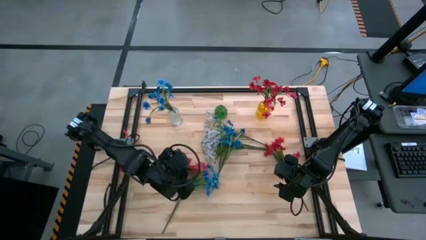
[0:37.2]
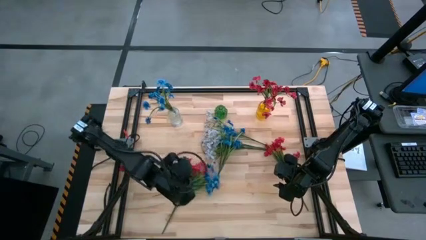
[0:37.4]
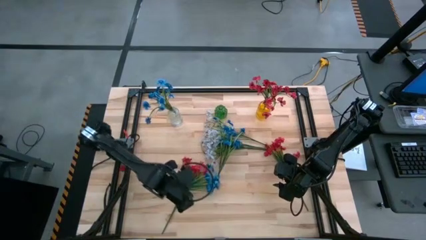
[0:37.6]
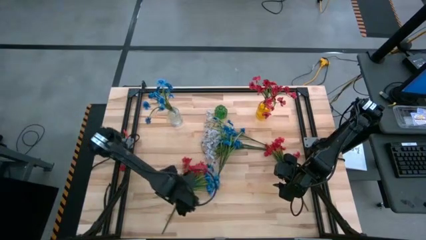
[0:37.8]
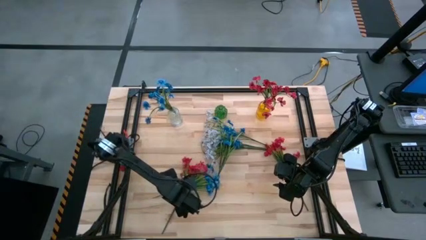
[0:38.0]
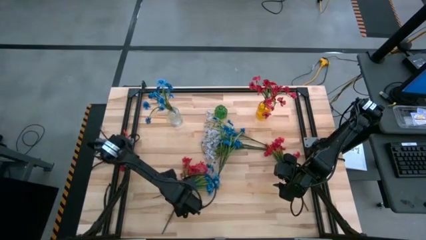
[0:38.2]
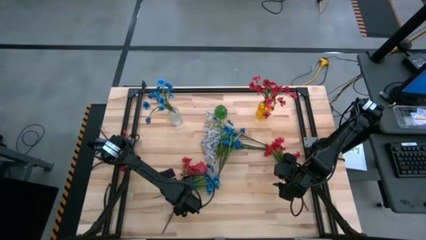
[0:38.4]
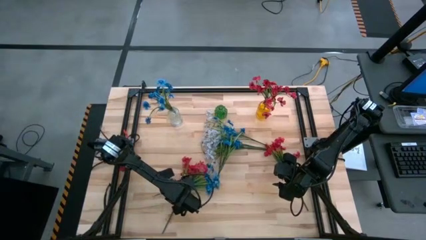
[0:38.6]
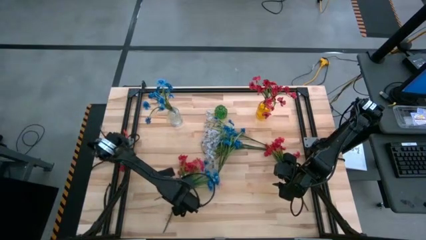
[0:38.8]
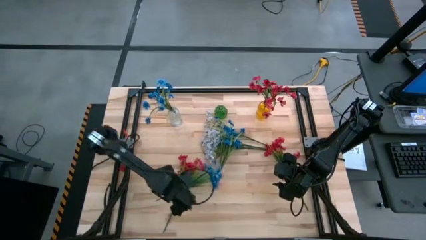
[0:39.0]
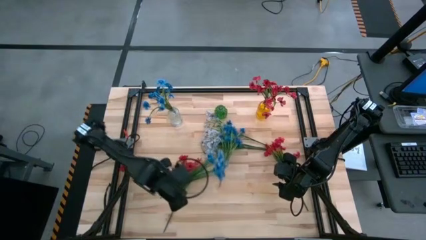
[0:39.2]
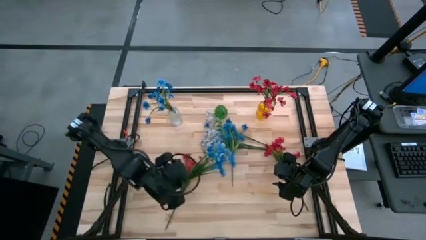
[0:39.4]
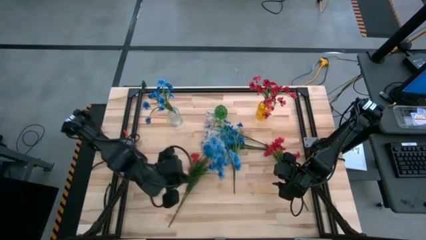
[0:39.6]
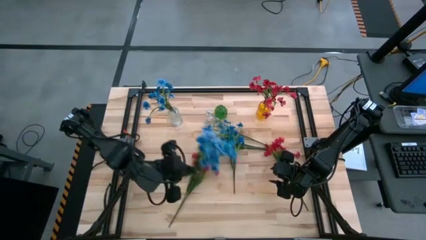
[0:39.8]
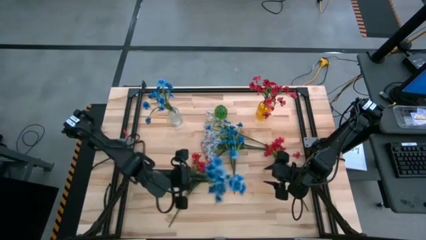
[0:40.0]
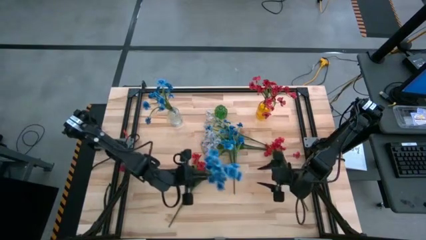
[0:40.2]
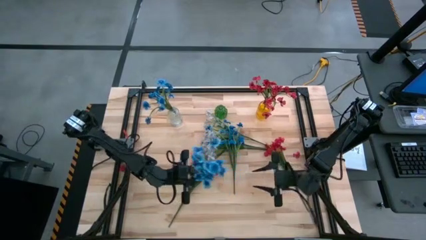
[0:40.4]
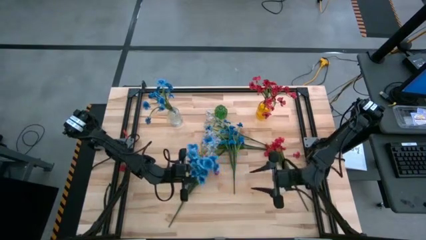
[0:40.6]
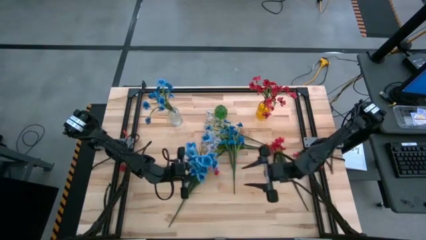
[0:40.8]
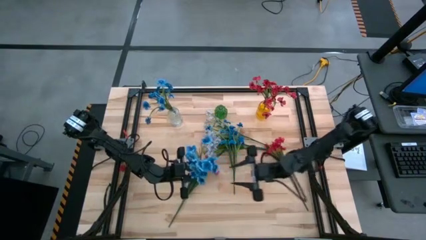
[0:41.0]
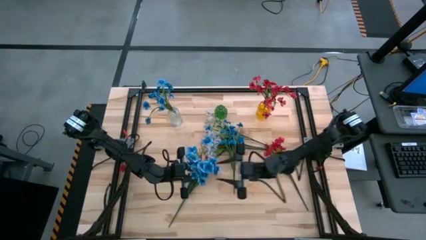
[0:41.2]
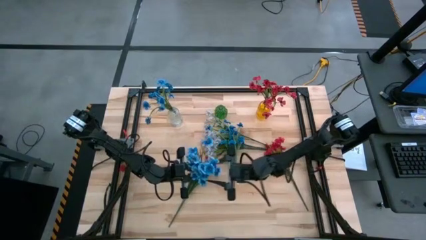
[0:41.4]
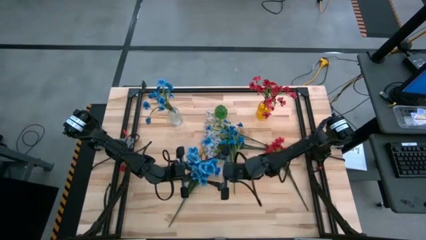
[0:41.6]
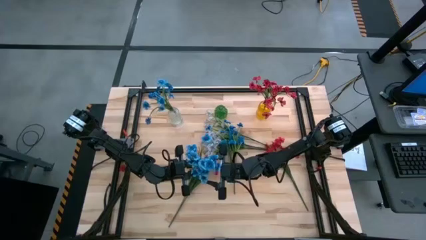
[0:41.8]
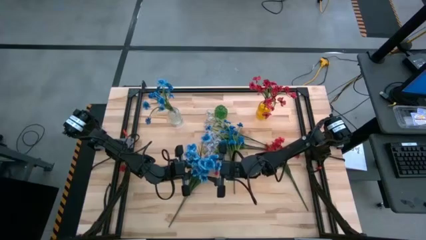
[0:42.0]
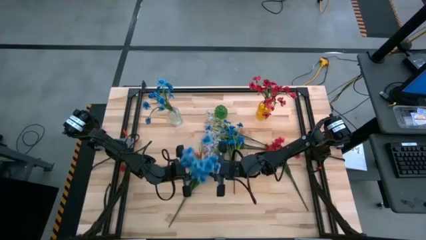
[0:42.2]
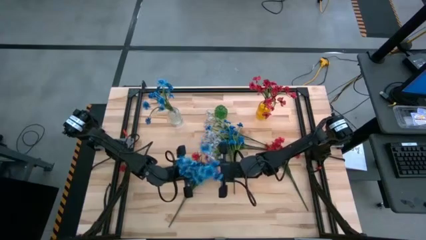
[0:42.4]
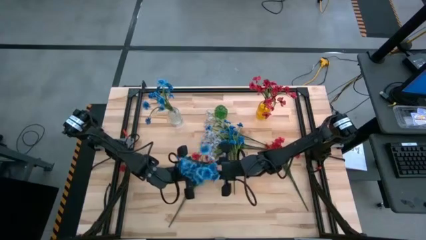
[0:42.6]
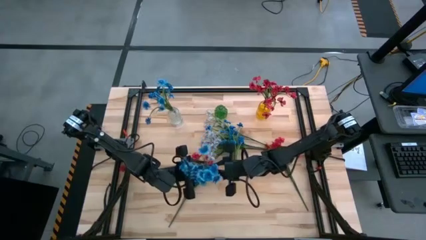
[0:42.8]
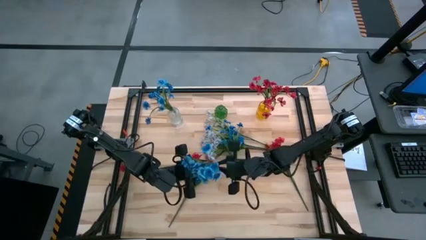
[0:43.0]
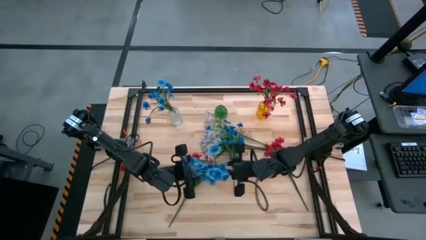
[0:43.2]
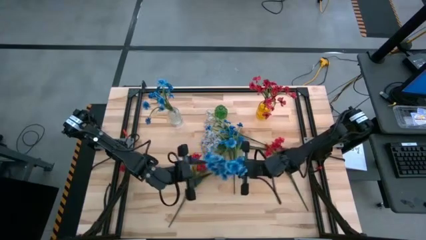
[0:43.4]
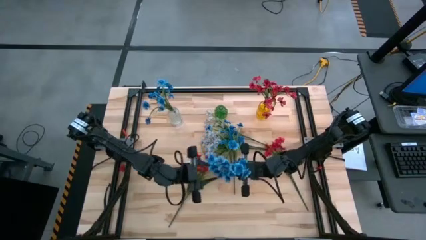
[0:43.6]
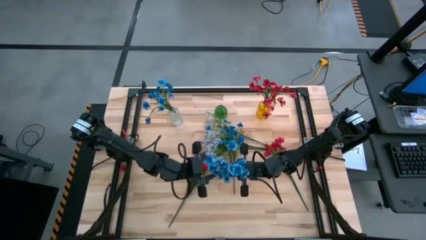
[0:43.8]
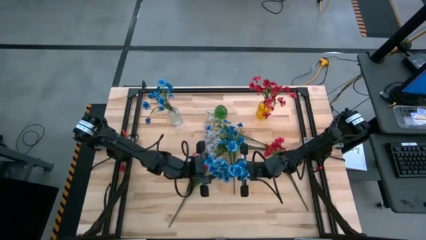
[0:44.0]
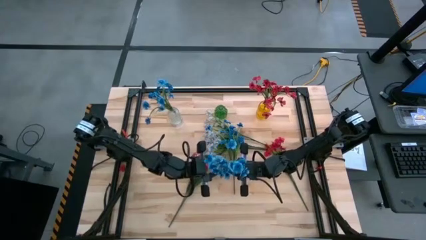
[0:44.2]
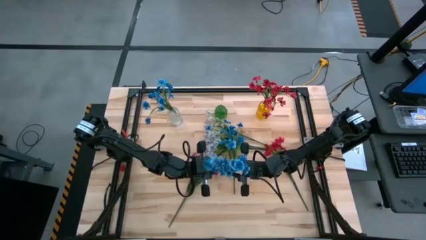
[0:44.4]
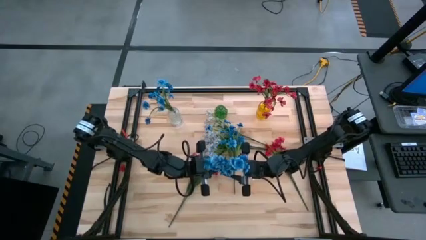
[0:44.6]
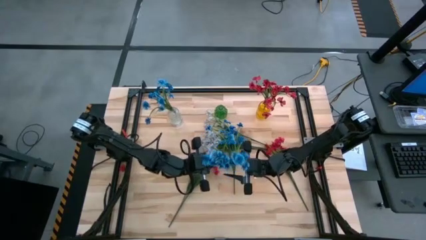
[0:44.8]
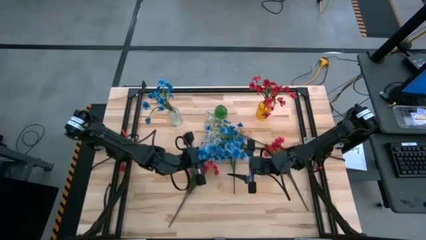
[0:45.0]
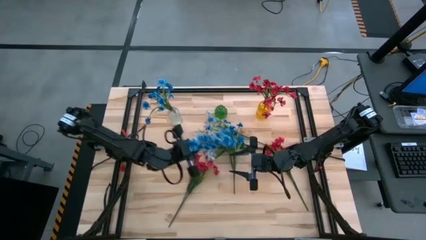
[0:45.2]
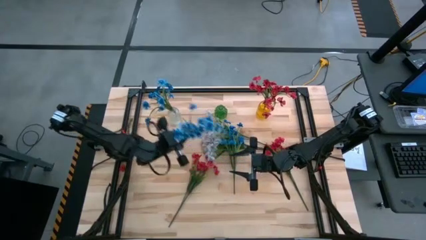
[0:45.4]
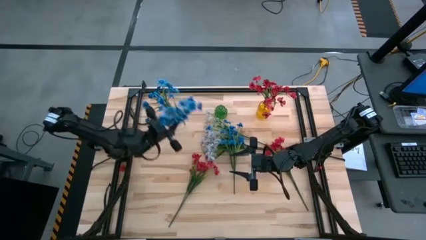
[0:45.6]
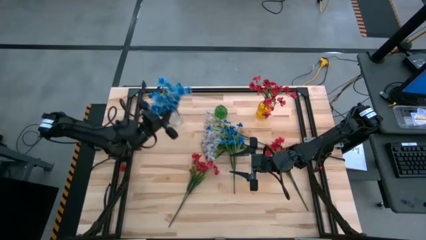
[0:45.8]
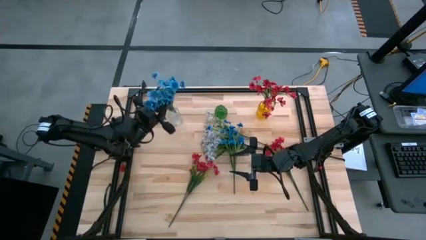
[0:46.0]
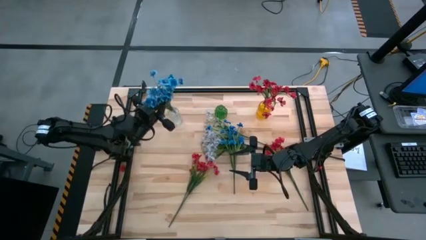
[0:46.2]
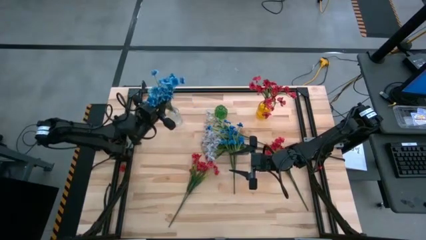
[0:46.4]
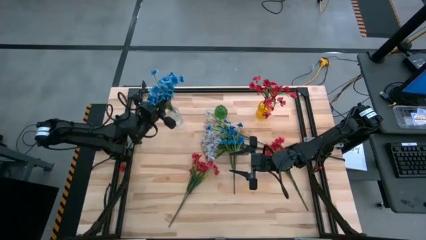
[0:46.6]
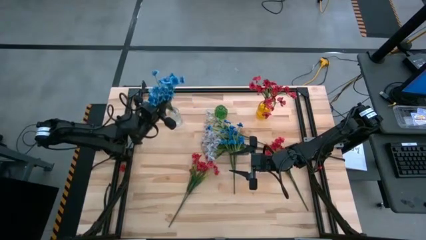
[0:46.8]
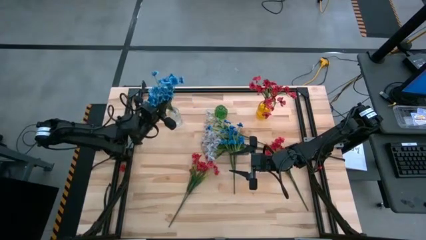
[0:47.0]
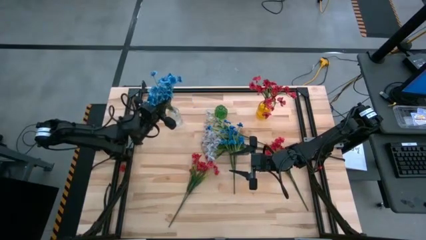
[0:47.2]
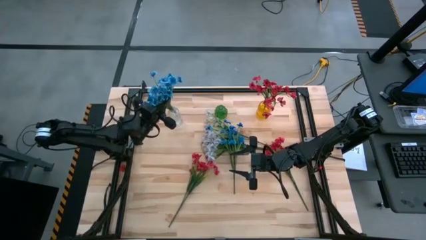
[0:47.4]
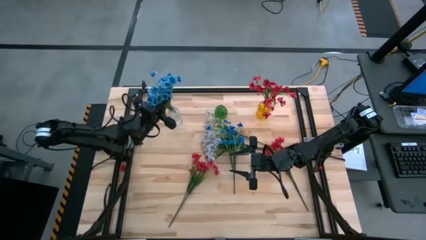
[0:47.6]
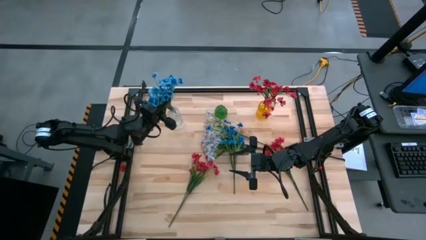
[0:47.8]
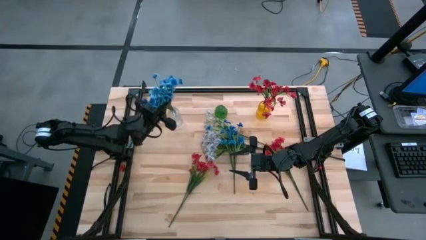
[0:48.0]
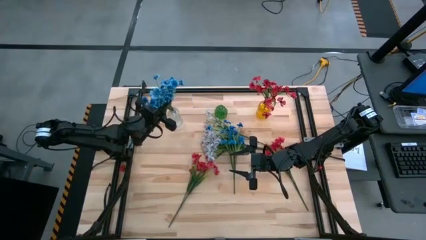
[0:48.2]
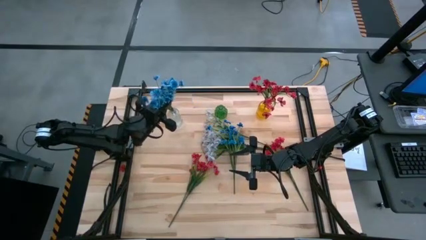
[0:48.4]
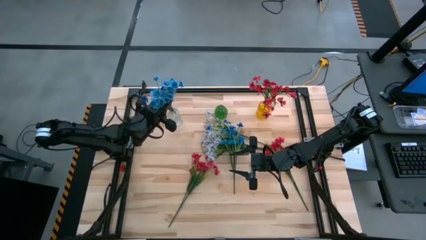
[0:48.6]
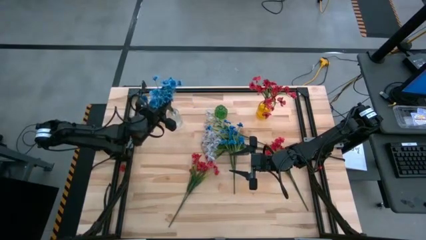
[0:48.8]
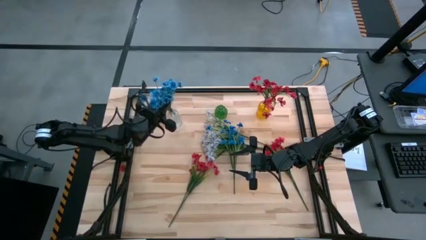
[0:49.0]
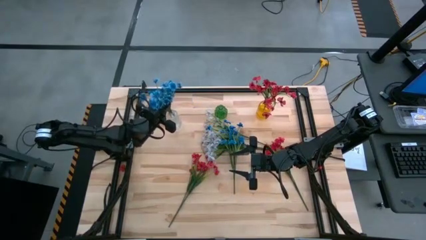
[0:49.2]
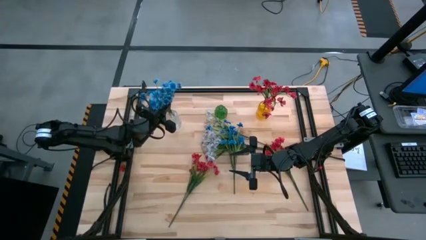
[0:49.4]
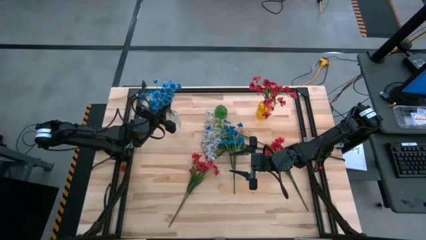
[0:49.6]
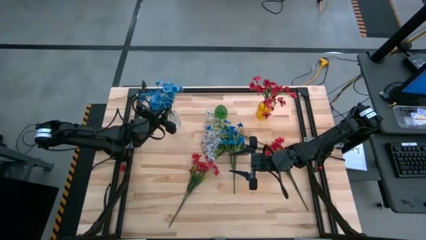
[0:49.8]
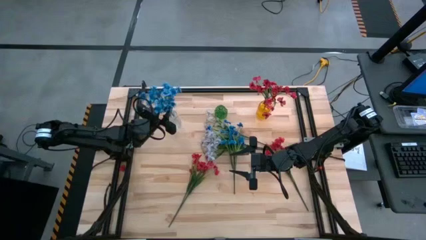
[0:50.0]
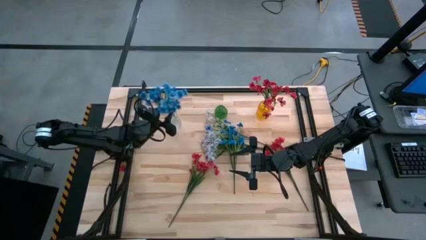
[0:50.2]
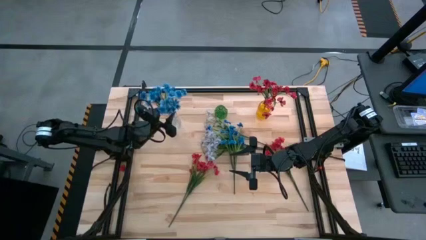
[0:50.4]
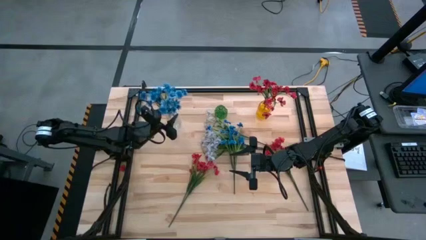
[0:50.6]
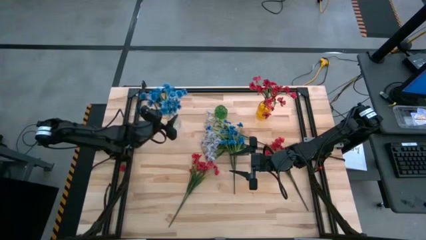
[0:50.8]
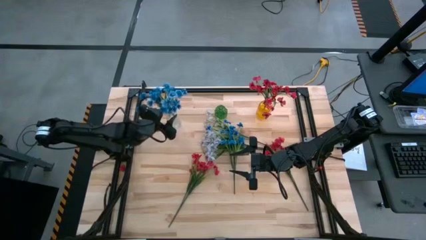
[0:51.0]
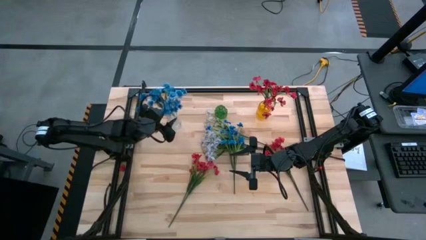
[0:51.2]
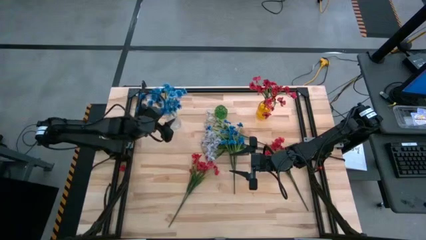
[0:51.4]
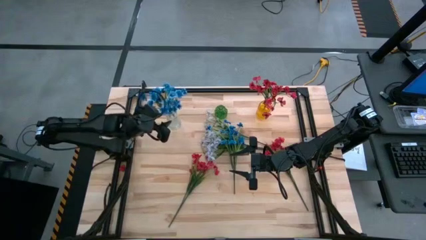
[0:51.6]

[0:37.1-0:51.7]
Task: Sort flowers into vase by color
Put the blue flowers into the transparent vase

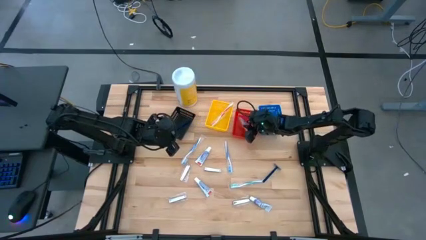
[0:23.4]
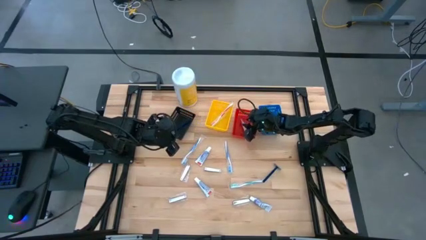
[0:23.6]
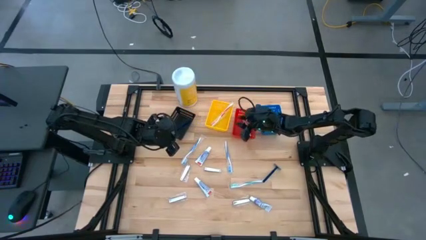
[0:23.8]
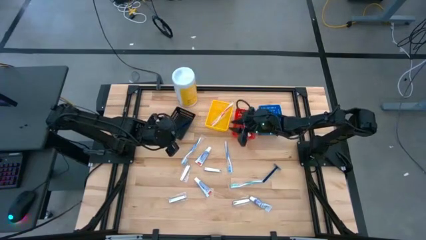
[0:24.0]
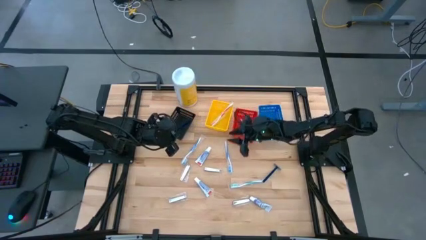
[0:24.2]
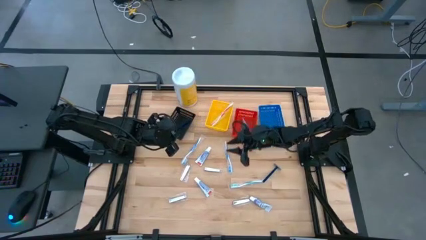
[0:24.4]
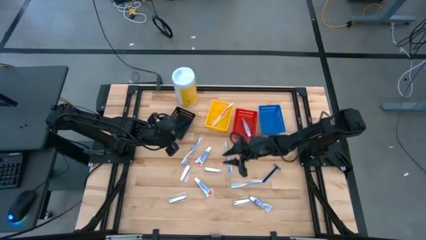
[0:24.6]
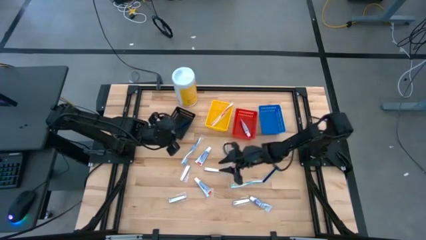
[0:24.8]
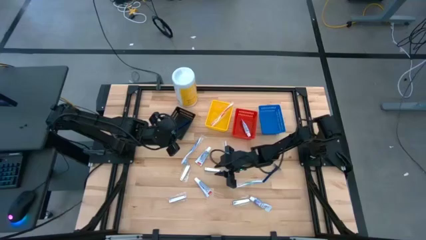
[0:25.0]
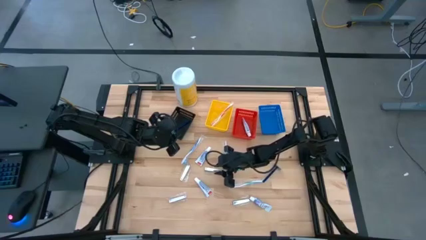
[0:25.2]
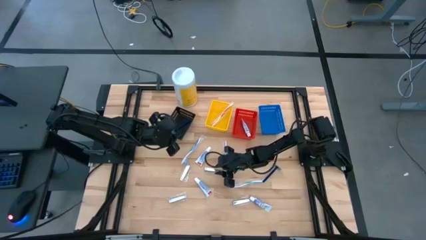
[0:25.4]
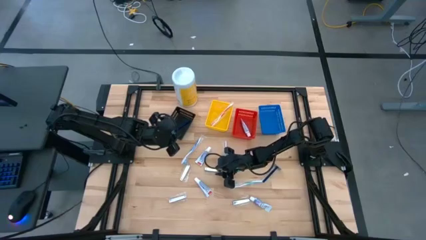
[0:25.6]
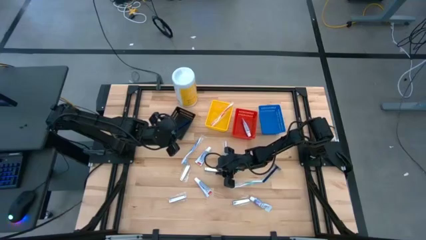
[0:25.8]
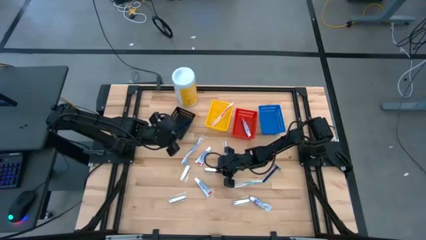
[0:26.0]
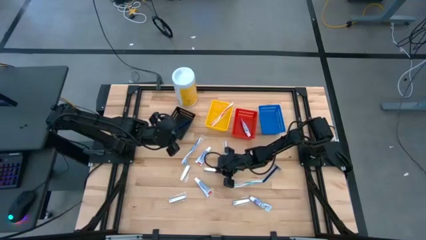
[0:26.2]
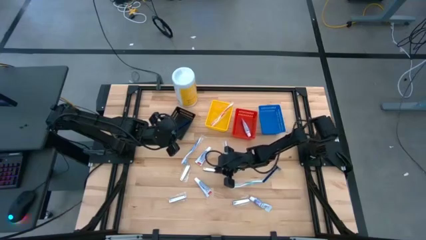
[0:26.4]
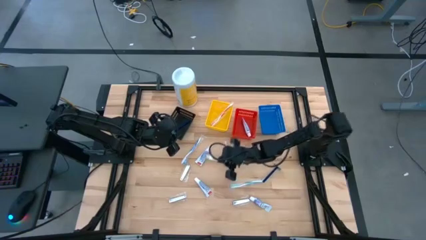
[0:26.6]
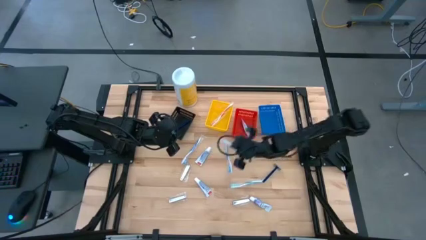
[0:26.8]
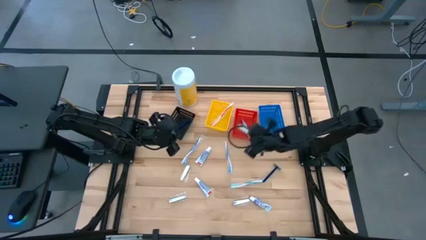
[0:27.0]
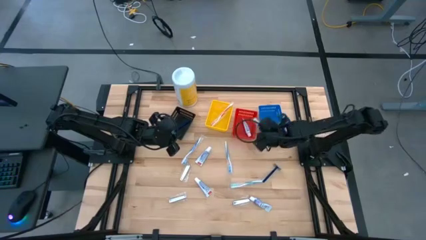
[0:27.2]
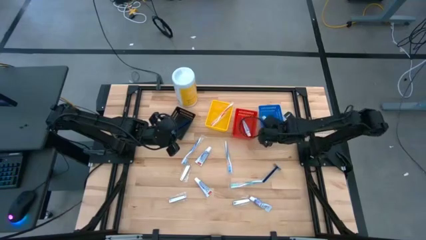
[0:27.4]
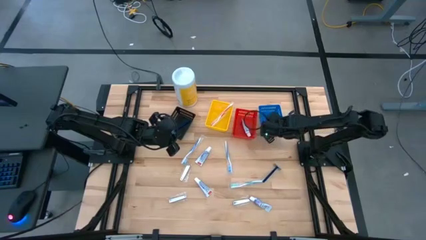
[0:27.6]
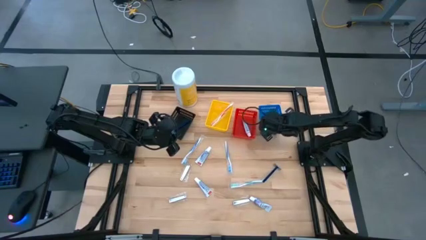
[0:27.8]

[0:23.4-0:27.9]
Task: Pick & Place Travel size toiletries
Put the silver nail cutter into the blue bin
